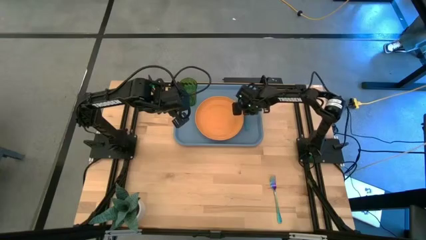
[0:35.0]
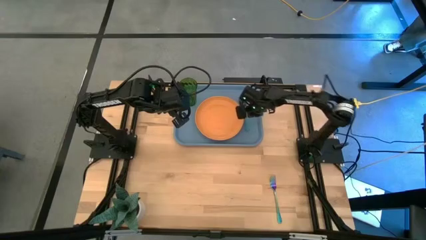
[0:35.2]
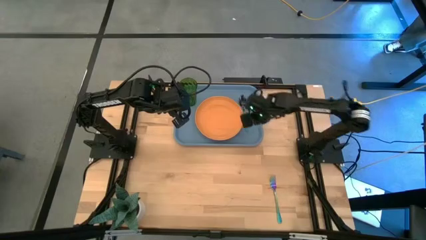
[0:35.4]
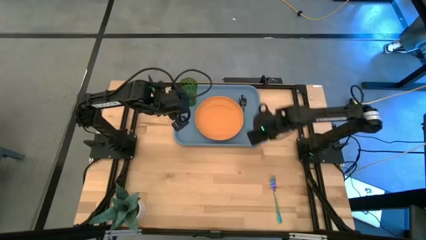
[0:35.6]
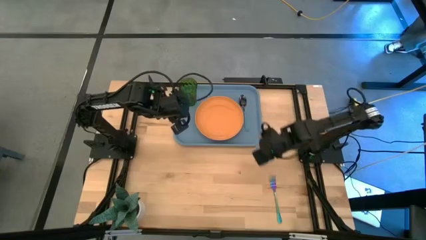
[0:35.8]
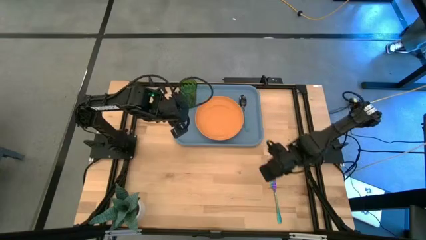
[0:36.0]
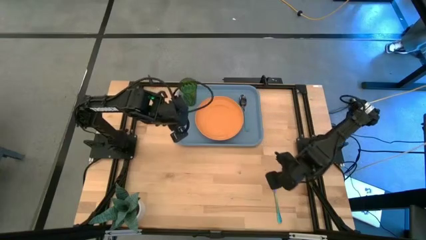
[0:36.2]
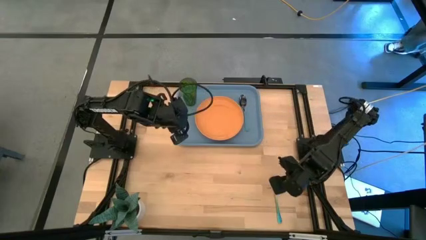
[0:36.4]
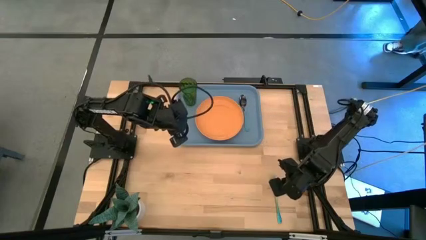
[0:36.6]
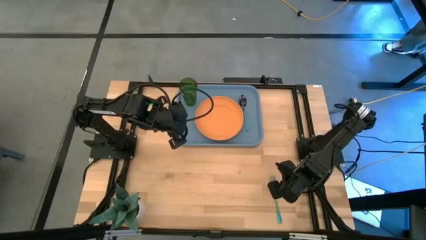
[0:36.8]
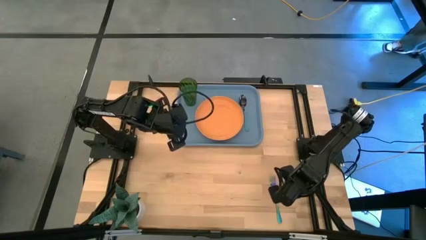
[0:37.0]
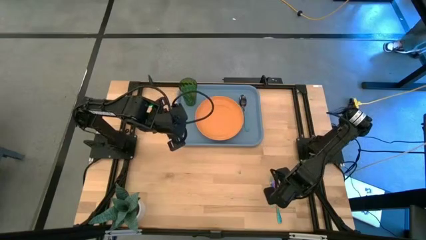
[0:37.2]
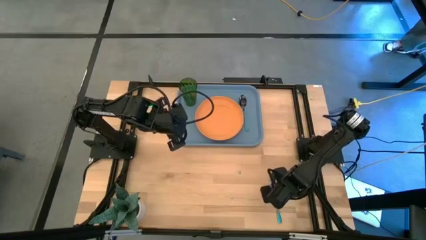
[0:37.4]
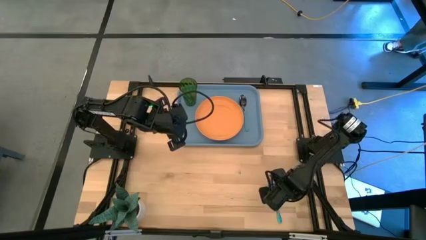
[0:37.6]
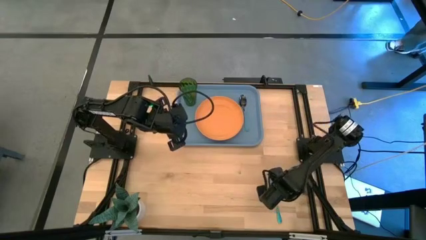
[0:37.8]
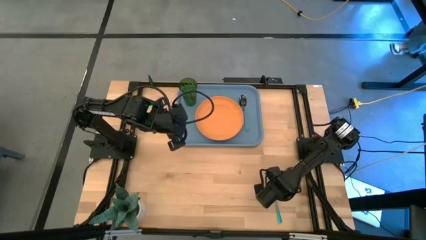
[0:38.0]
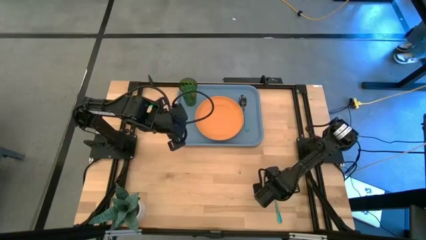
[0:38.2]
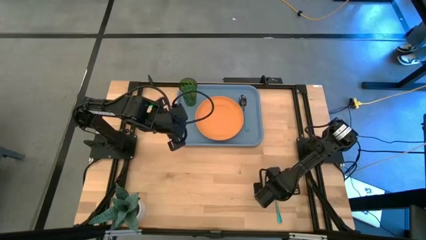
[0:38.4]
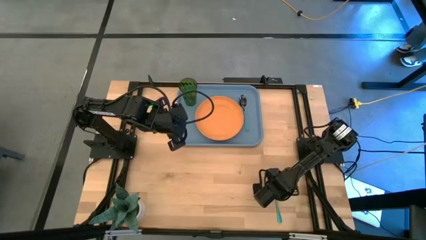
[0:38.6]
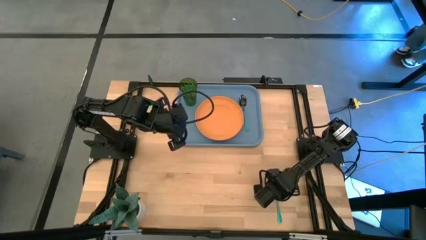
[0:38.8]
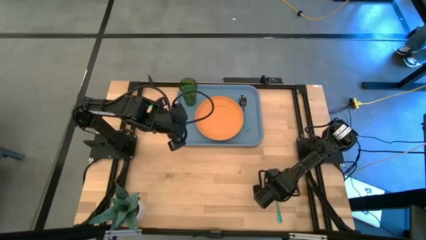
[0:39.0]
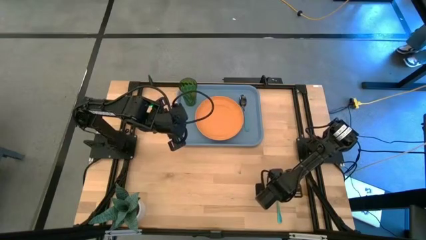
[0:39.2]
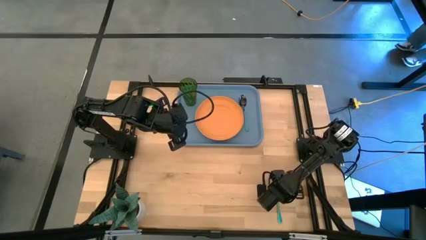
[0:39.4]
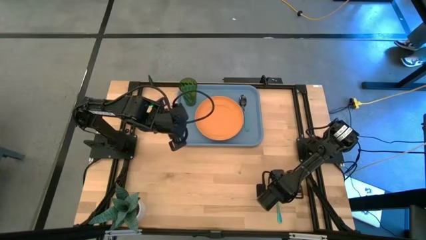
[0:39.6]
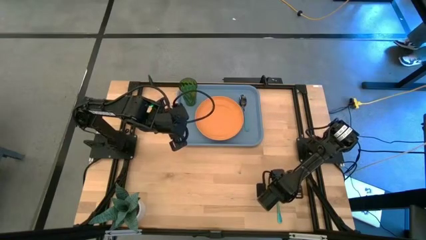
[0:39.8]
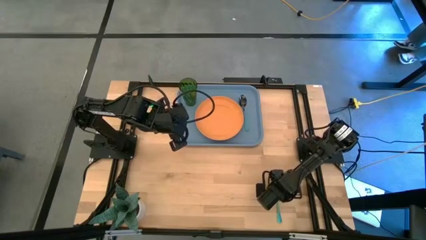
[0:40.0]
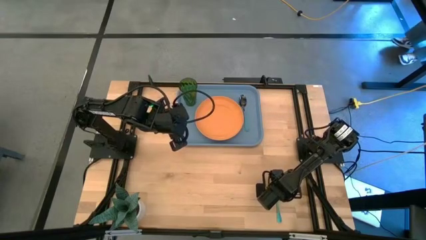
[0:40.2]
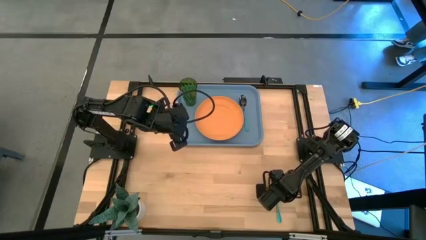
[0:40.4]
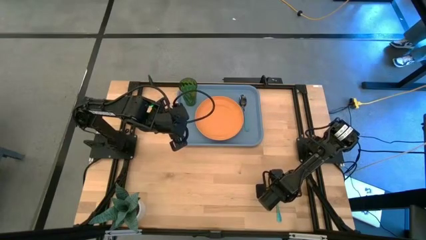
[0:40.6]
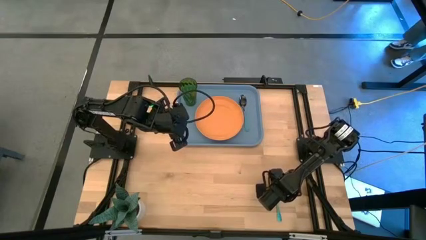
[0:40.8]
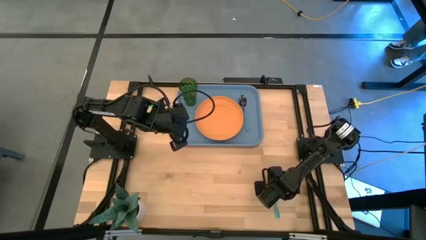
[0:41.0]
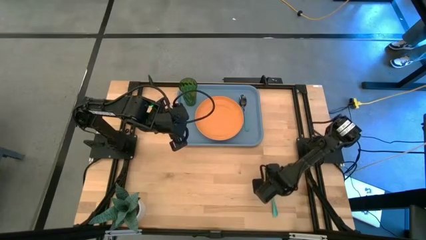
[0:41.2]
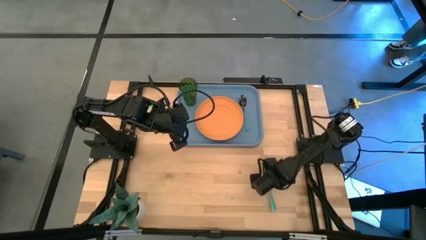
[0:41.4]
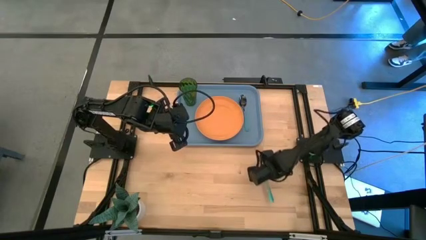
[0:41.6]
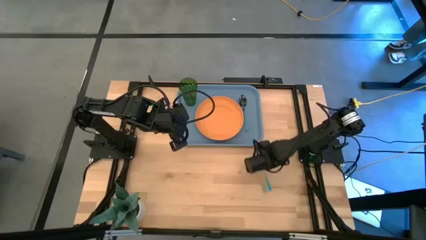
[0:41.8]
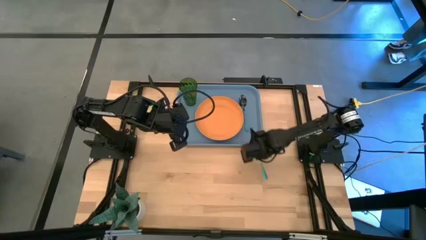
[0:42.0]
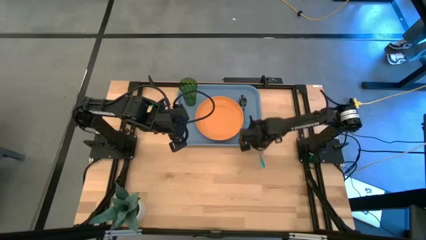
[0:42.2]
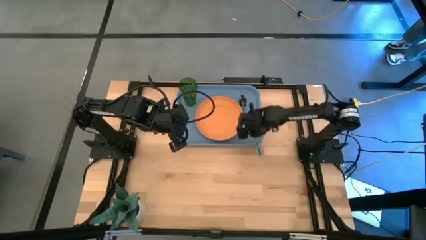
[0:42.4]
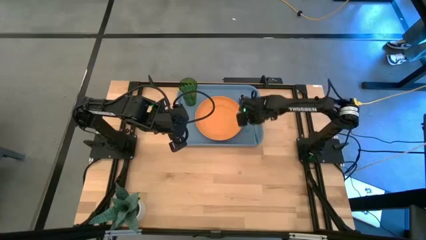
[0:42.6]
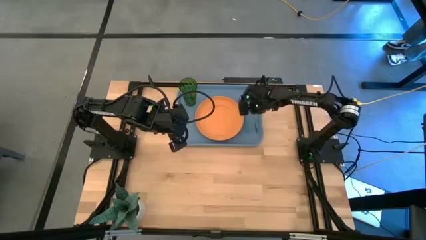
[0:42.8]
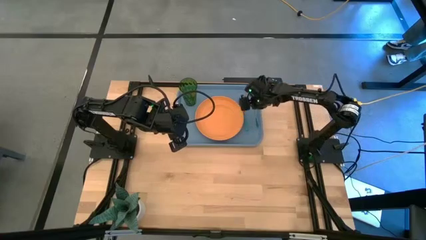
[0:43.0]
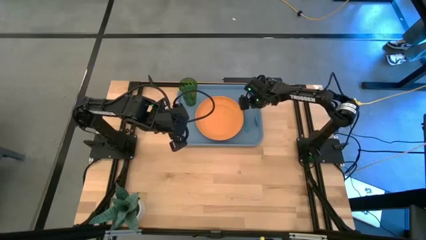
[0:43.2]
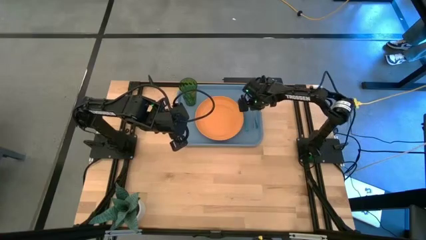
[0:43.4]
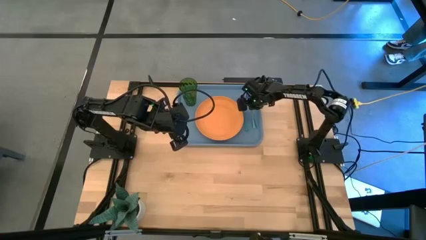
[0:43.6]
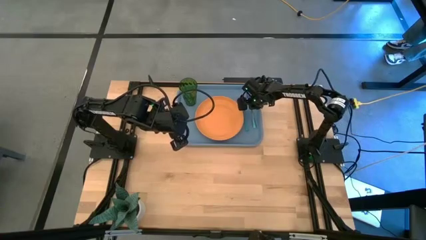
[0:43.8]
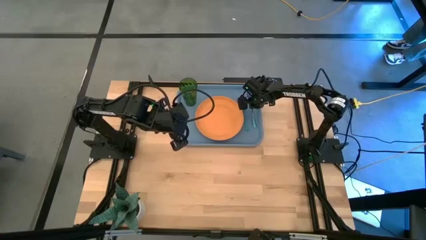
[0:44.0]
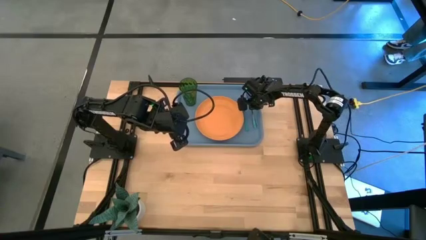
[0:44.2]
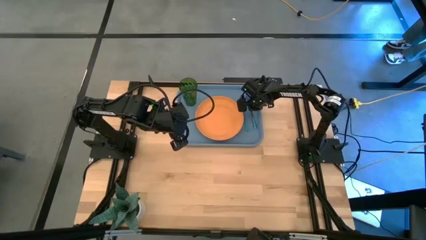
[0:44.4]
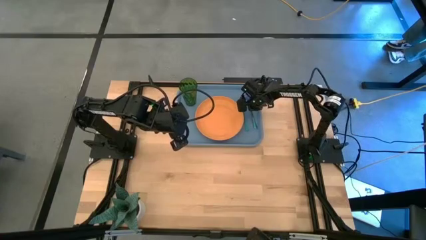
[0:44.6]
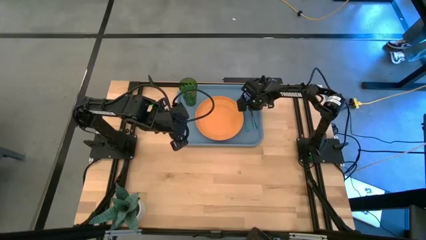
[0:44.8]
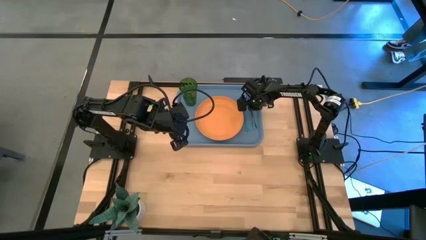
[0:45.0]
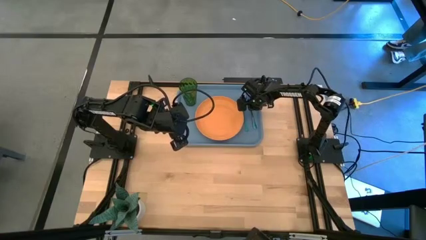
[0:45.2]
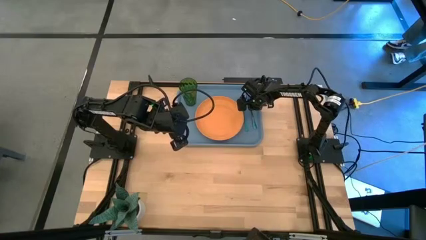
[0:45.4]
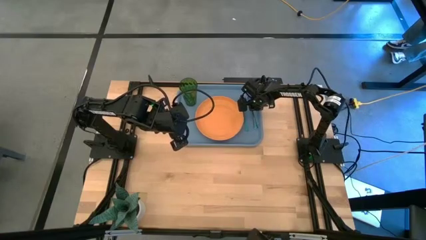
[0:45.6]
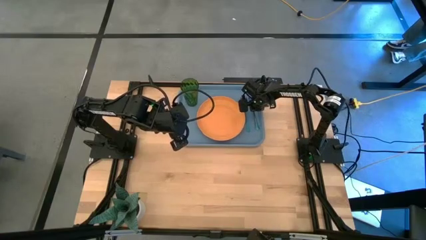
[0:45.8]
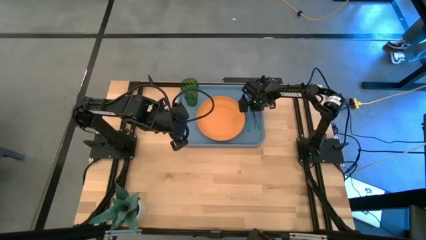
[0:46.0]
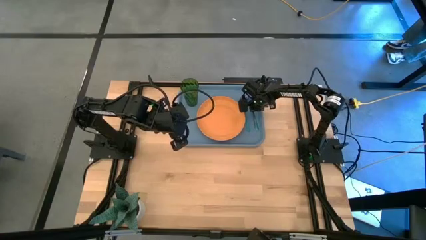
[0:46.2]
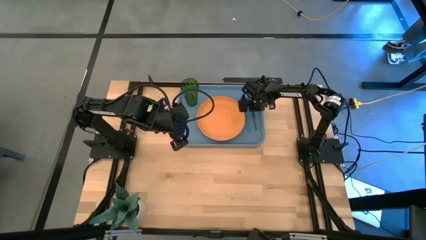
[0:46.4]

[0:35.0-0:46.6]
Task: Pick and place plate/cup/fork/spoon on tray
Put the blue fork on the blue tray

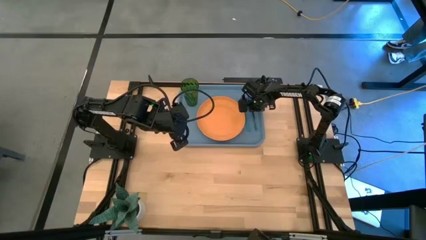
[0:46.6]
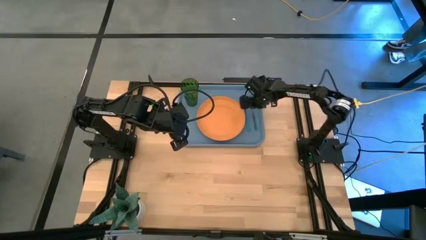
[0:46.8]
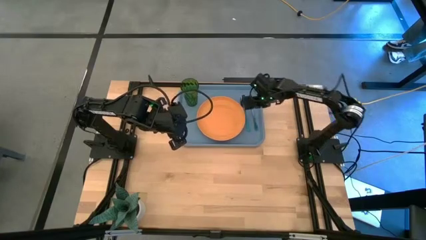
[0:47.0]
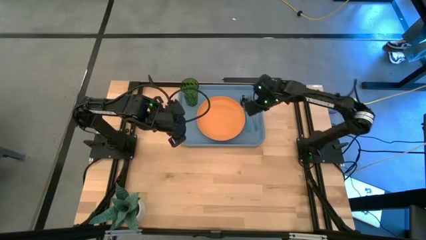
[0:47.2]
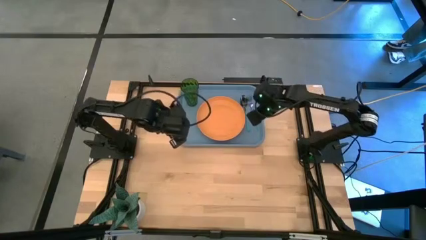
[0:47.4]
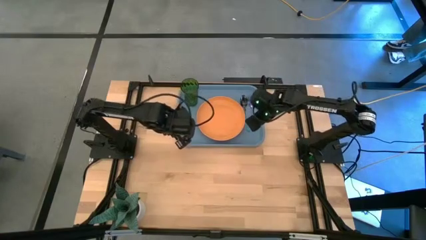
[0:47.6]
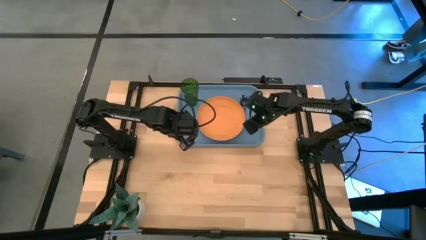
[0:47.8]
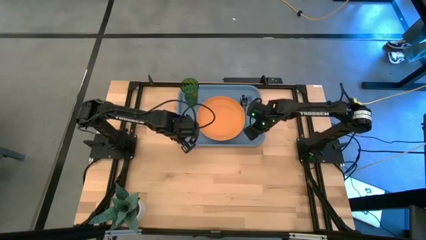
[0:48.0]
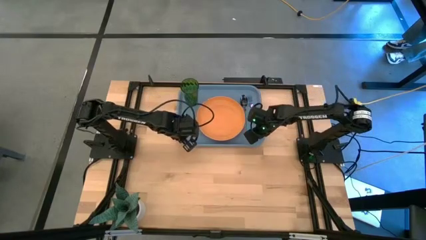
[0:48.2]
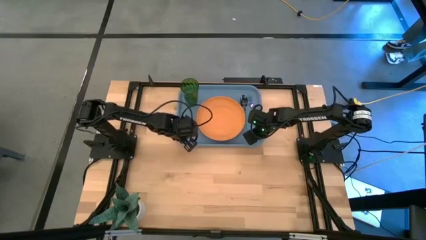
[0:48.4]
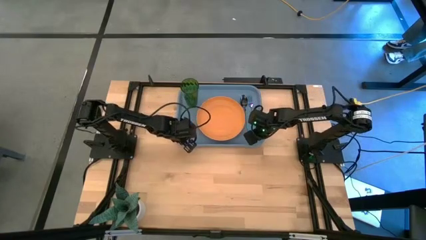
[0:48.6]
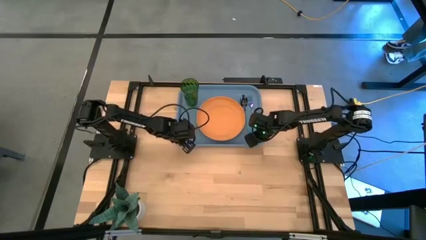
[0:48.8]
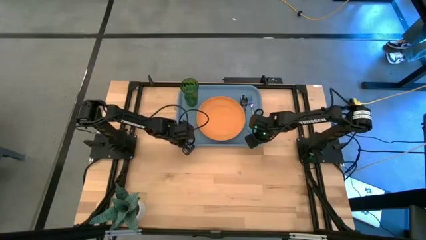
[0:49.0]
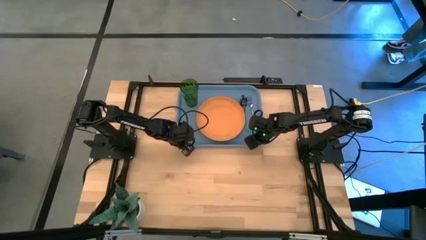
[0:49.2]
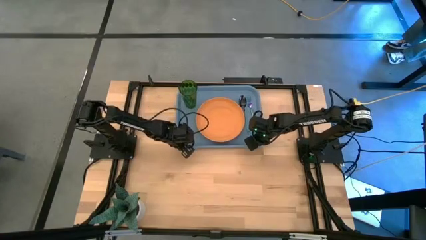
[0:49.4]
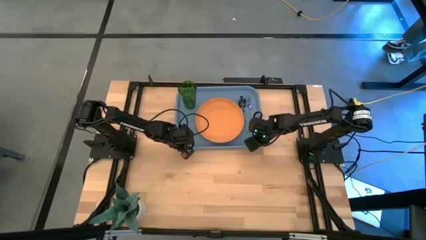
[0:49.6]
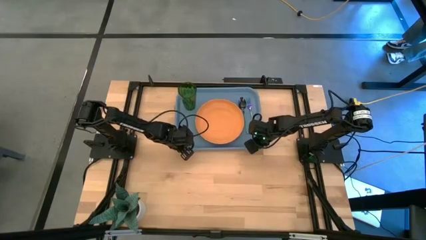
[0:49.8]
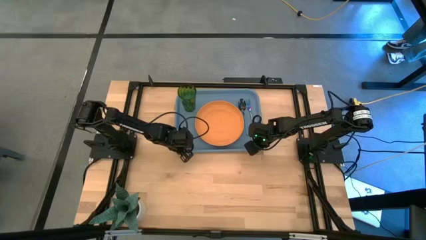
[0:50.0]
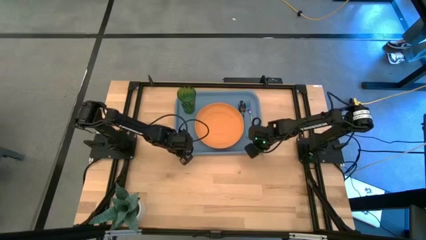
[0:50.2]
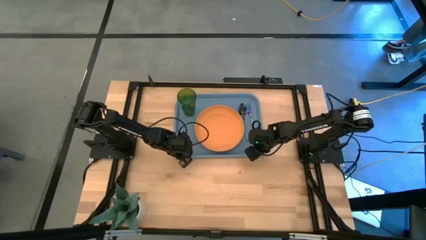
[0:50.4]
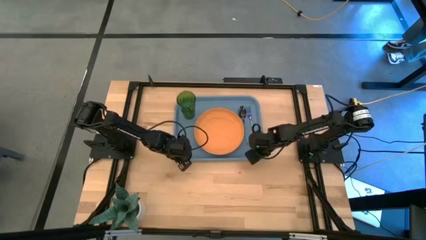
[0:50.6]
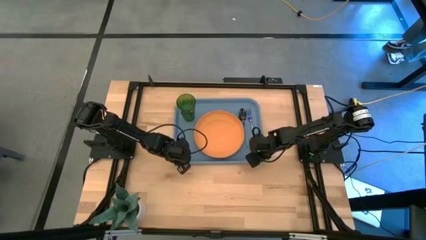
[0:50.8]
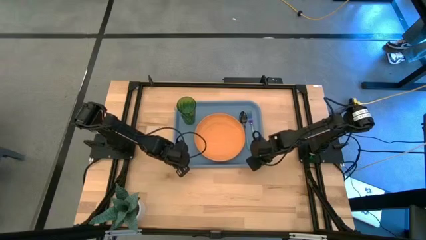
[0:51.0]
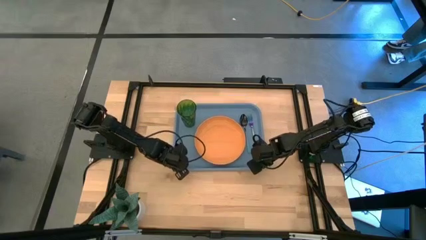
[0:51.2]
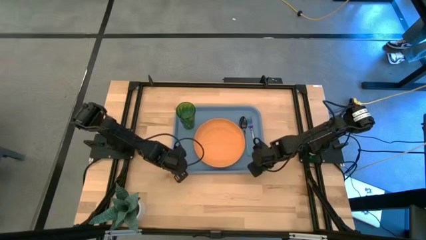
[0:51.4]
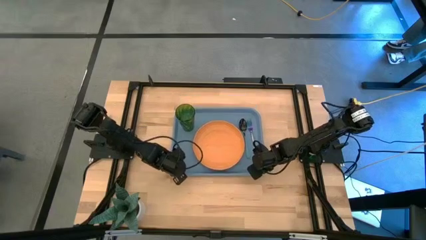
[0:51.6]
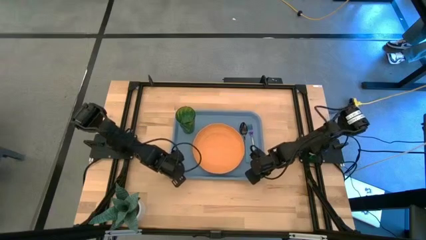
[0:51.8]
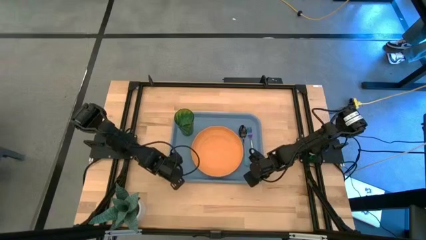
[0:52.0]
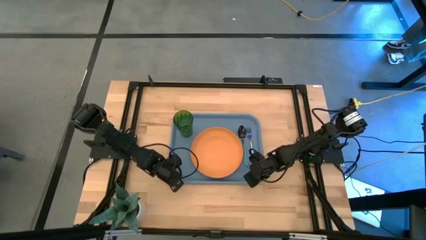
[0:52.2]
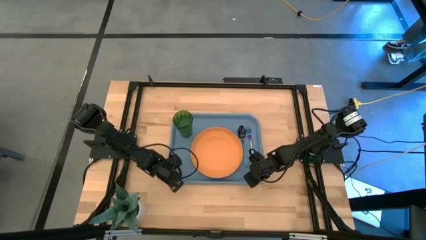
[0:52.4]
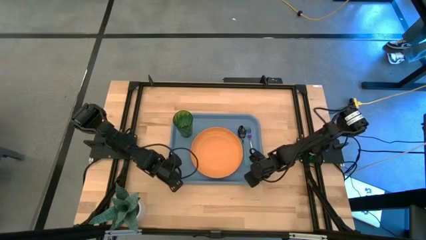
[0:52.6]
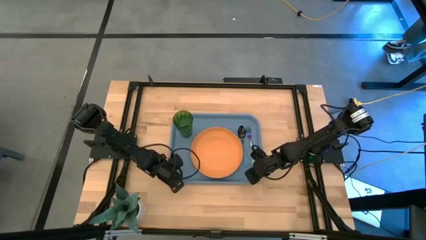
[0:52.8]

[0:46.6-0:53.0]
Move the blue tray to the center of the table
